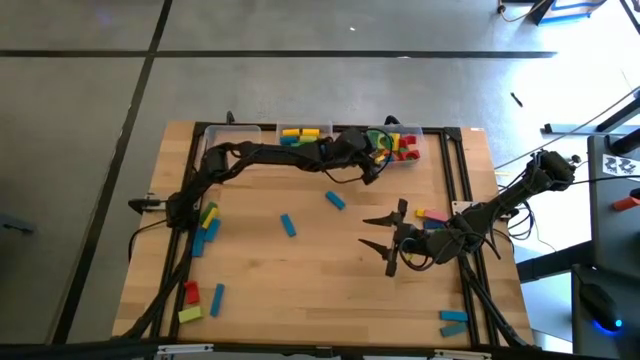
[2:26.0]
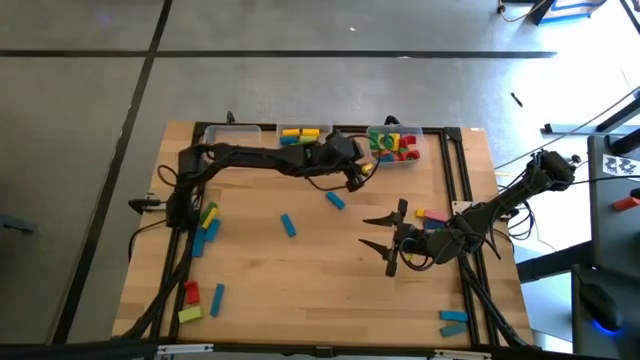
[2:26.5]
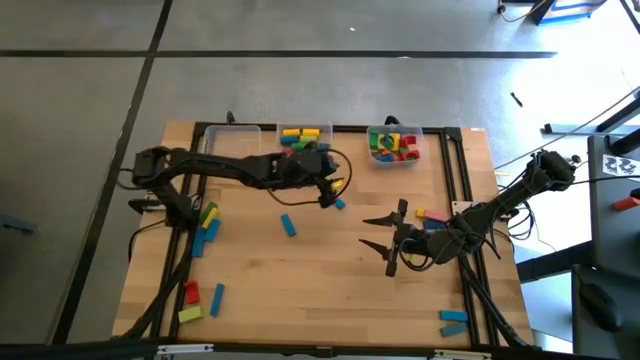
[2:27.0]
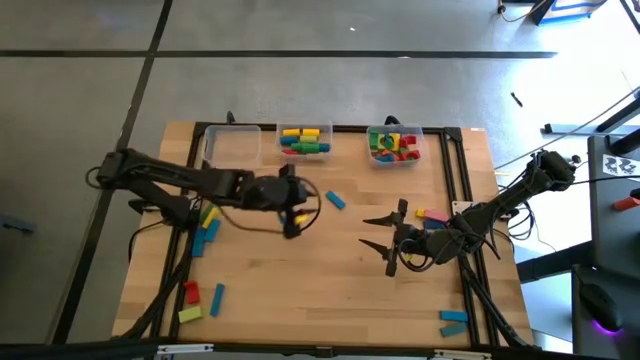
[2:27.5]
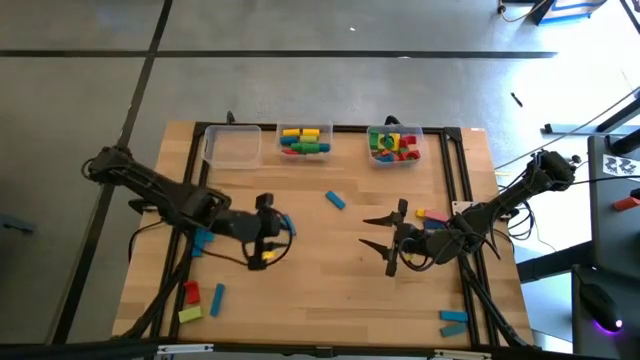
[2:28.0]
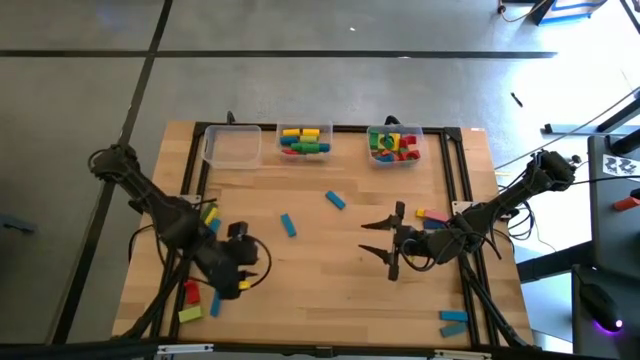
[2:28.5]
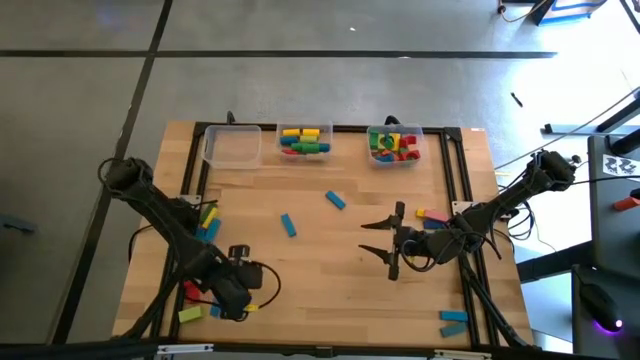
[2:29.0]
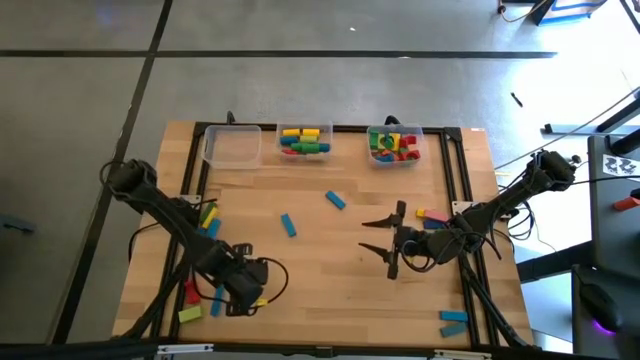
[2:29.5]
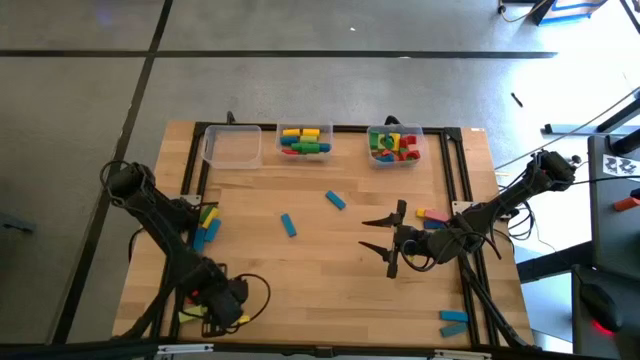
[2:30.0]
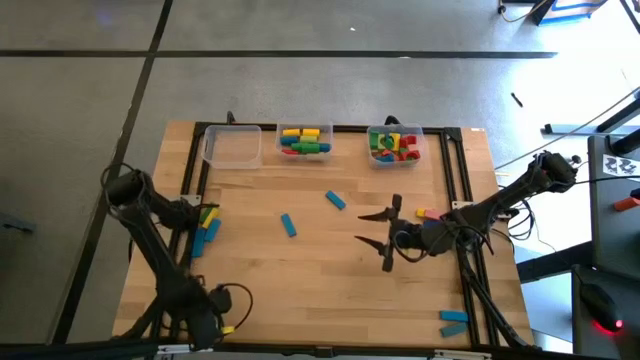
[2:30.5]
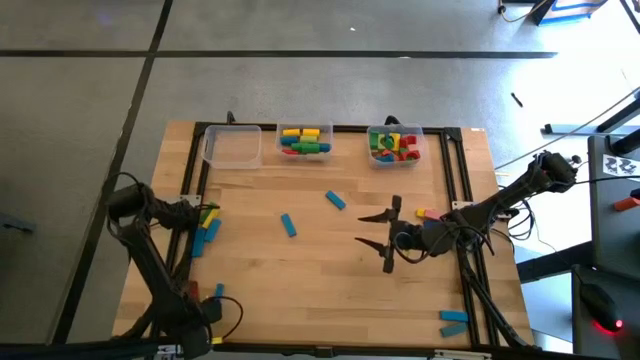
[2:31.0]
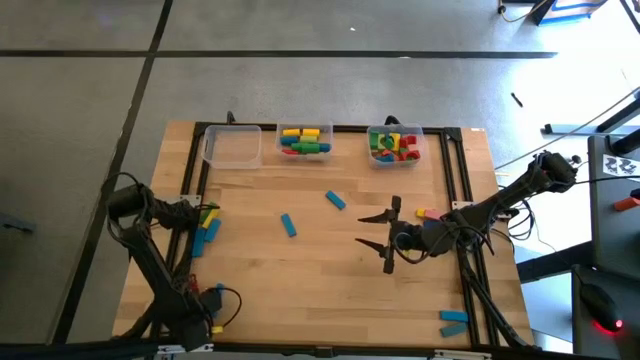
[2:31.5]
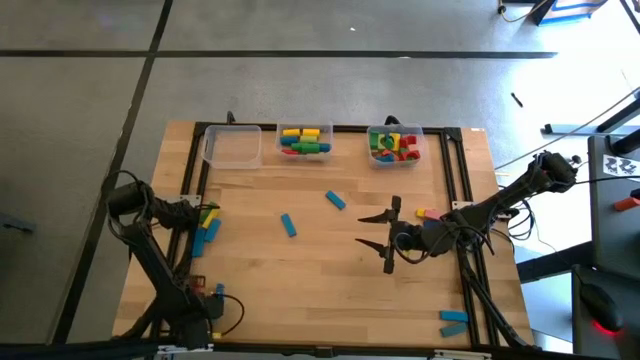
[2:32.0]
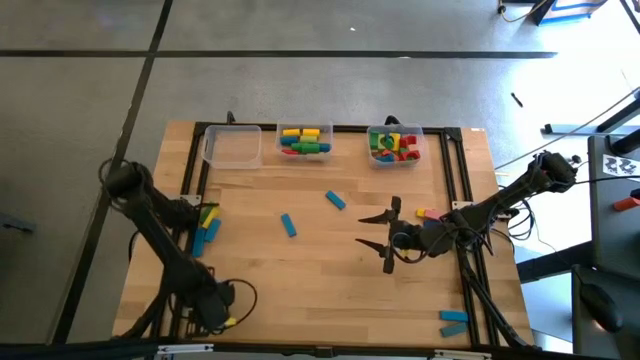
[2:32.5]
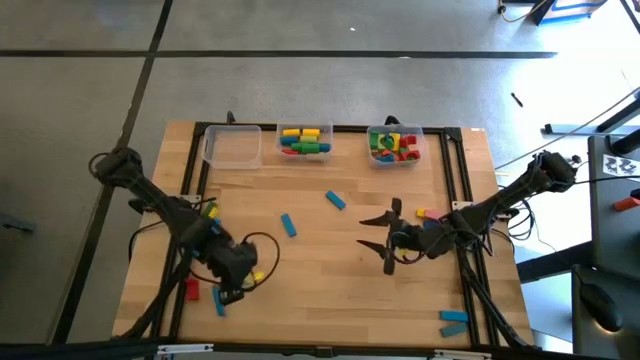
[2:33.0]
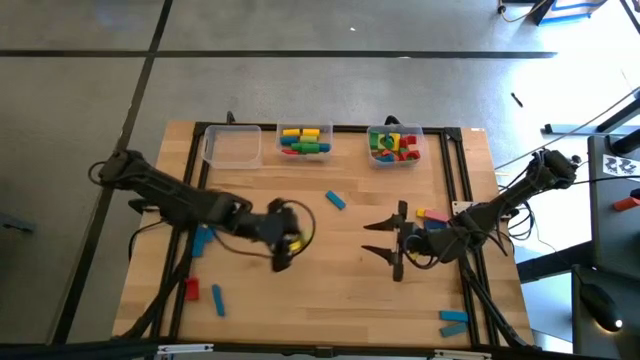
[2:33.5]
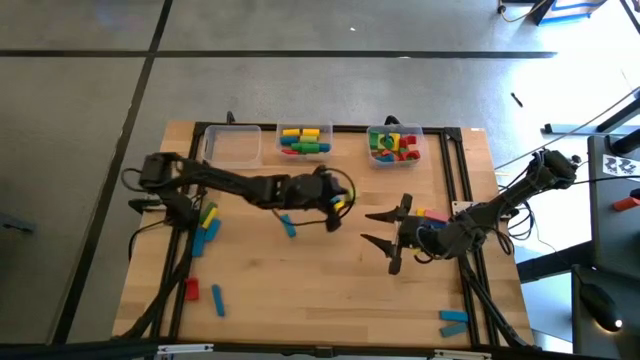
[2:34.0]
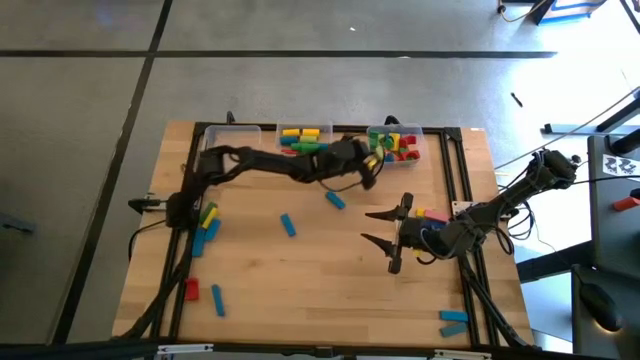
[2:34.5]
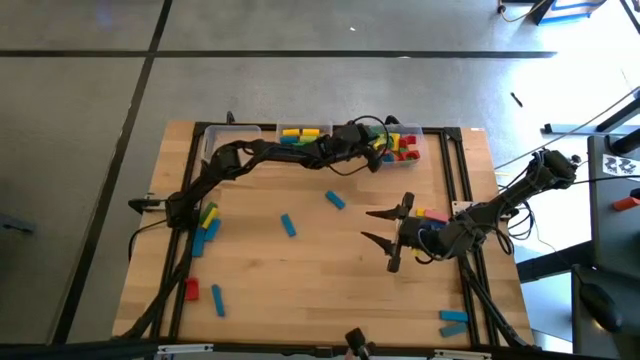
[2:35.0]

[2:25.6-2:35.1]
Task: Sort blocks by size
Put the light green arch block into the right transparent bin

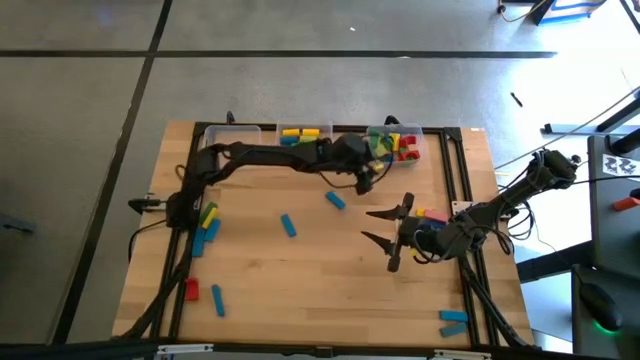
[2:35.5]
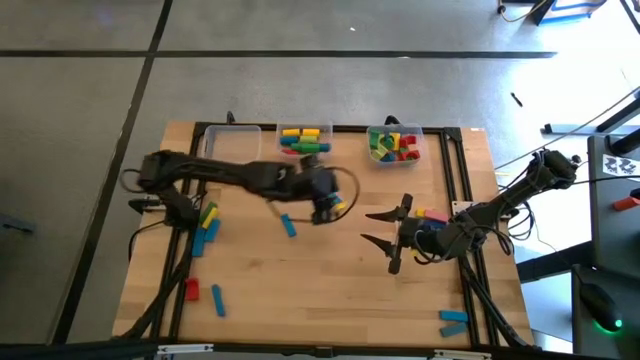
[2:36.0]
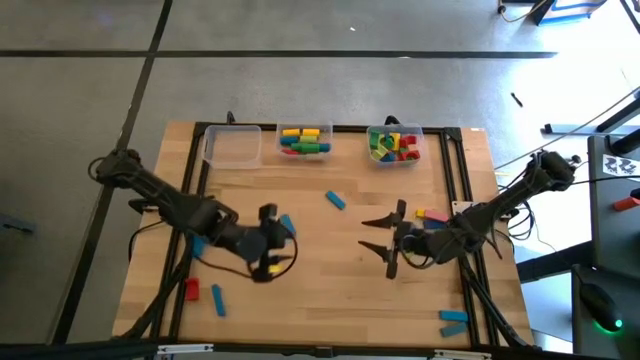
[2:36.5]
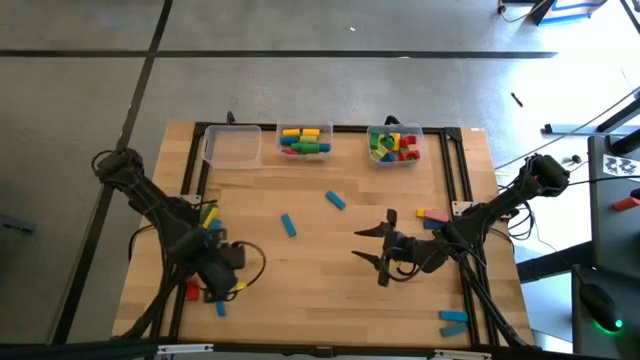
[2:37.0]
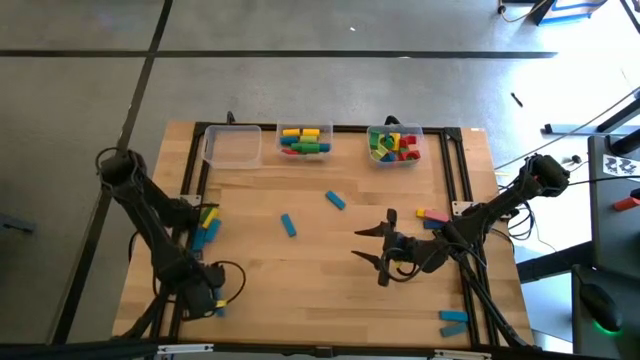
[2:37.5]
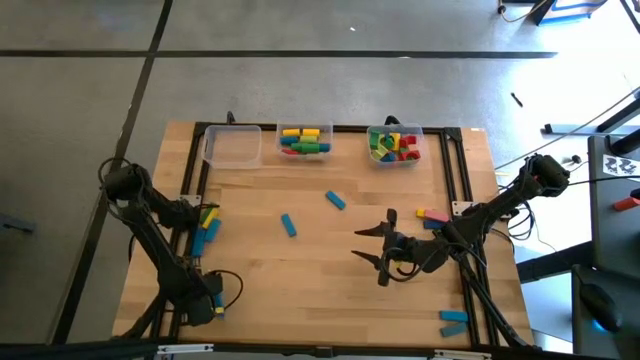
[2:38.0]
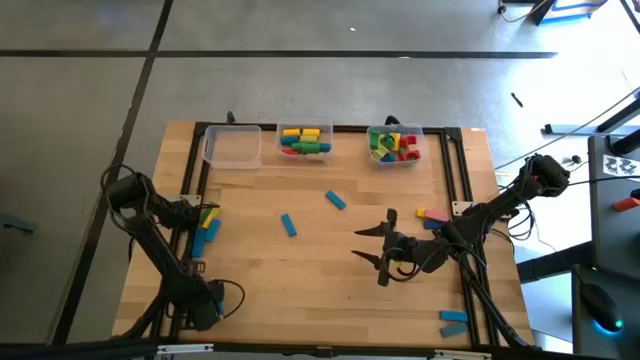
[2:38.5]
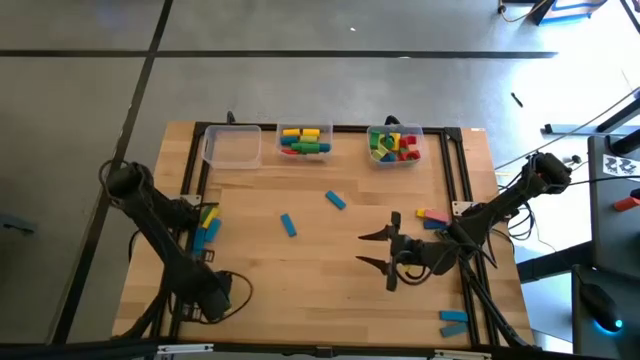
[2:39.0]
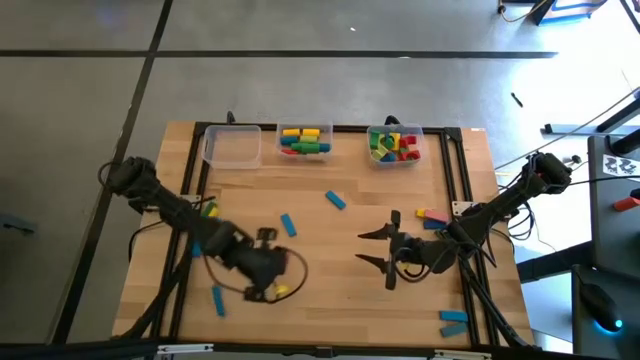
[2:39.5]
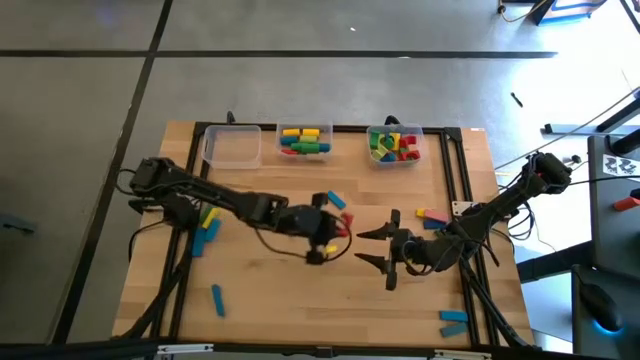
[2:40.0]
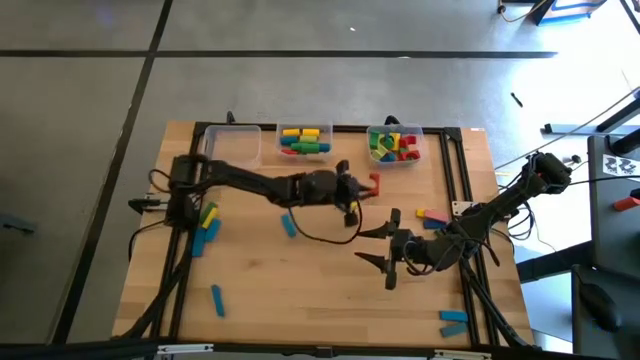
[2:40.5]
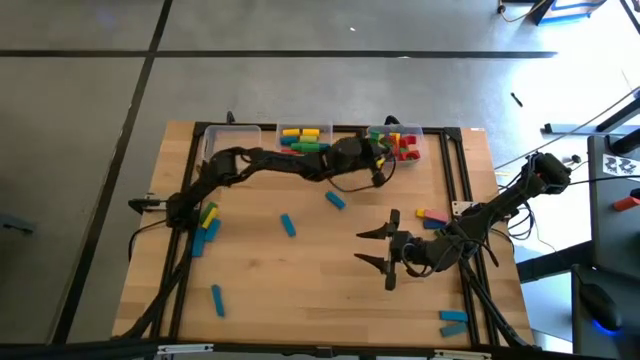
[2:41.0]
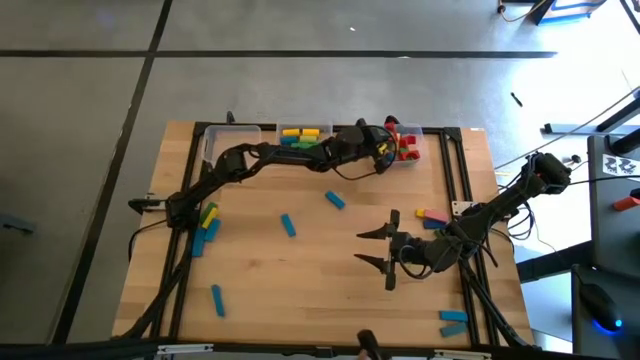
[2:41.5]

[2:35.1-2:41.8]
Put the red arch block into the right transparent bin

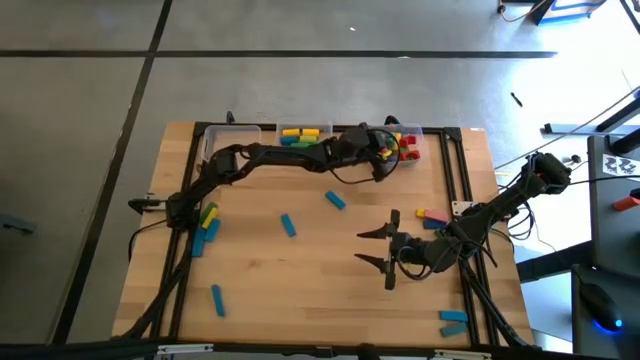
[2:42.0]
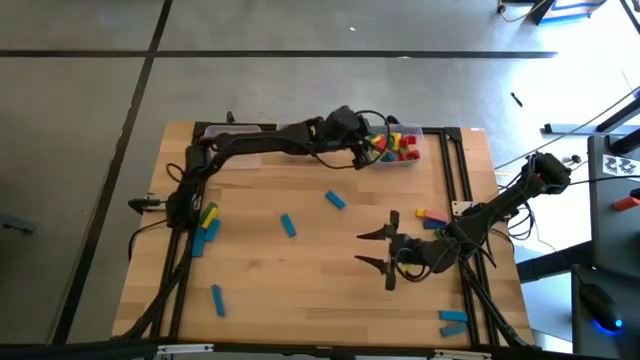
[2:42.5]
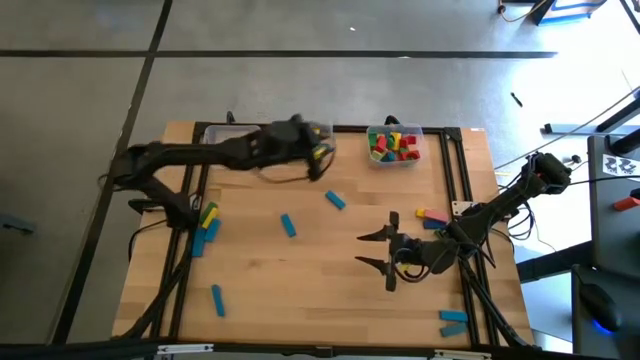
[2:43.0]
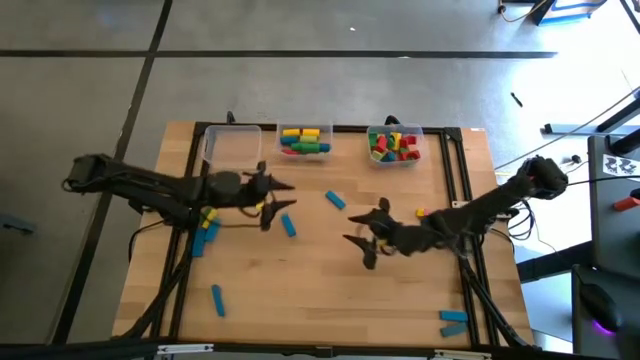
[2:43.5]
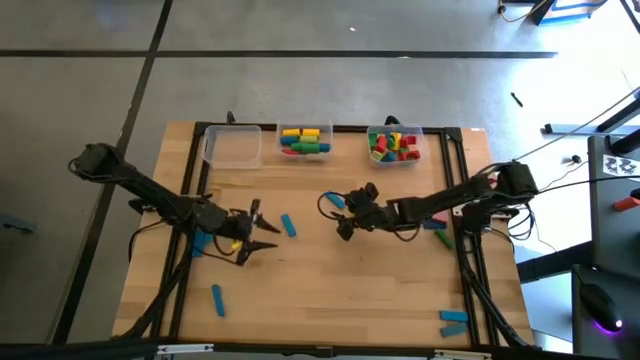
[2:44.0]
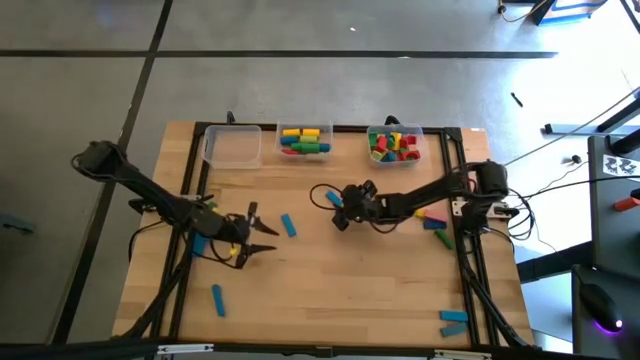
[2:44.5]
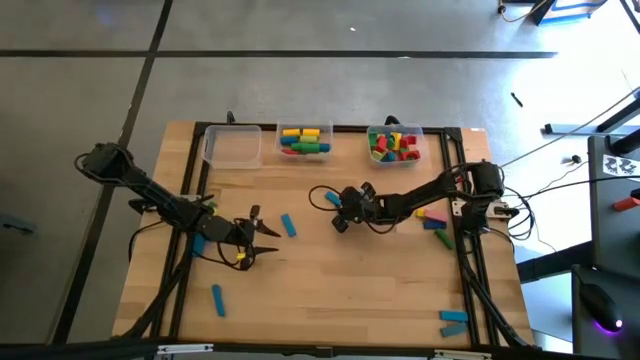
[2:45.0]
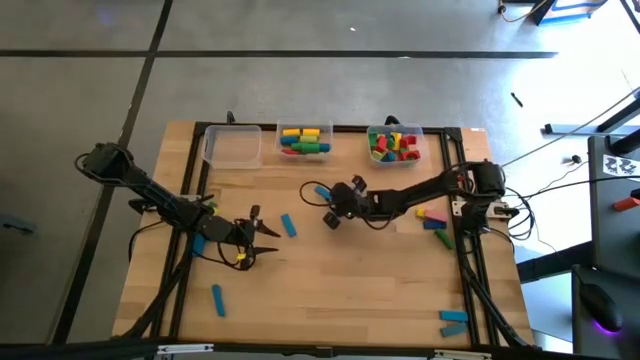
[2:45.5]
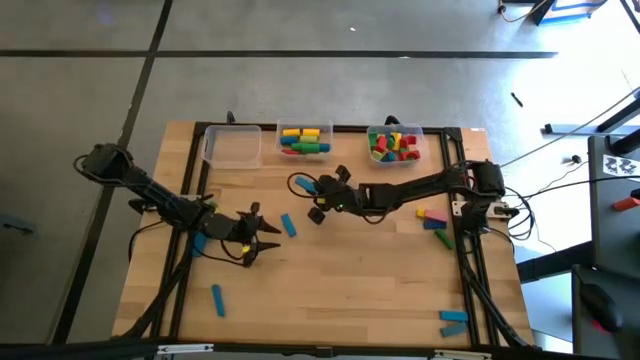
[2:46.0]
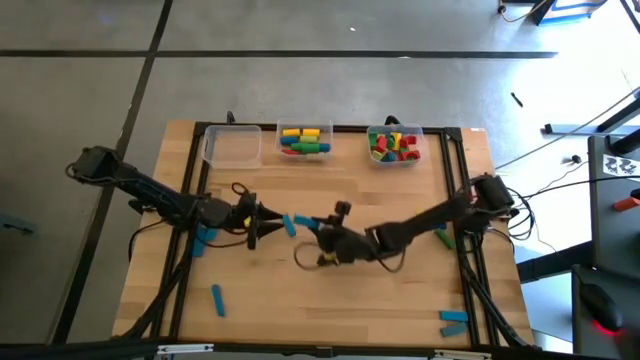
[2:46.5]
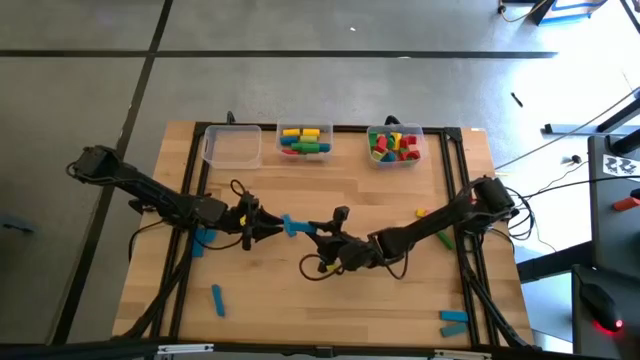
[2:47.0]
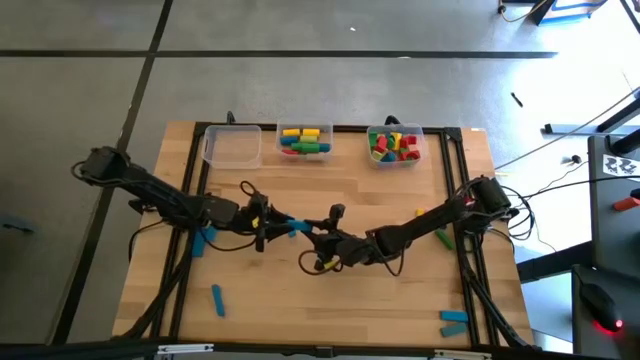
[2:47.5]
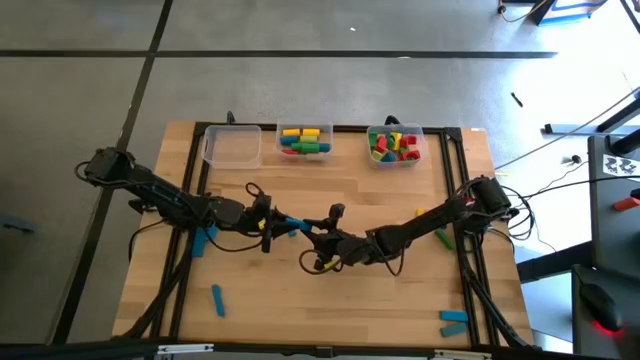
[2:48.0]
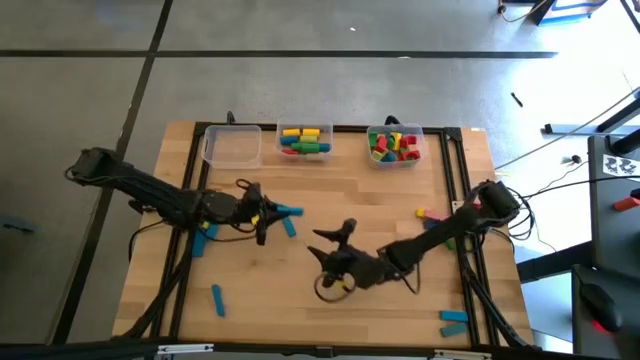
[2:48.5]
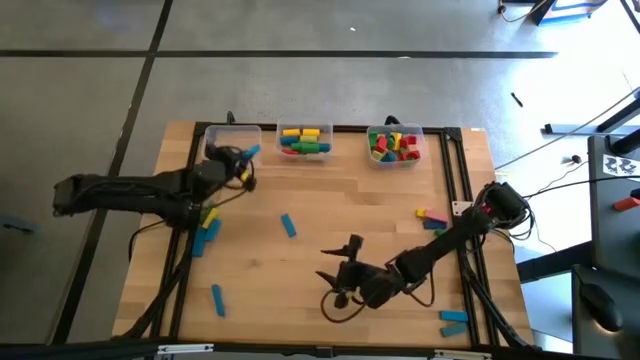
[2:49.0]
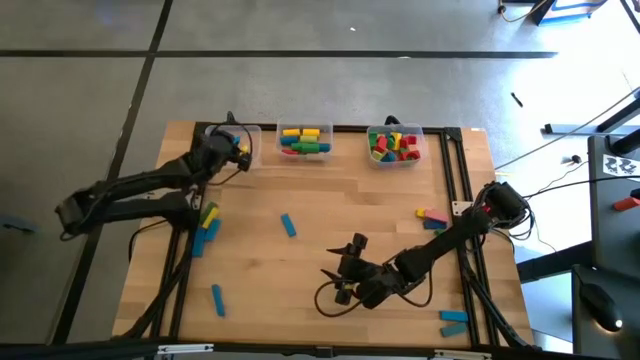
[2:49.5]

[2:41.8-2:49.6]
Put the blue rectangular block into the left transparent bin
